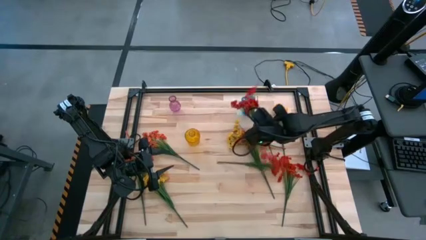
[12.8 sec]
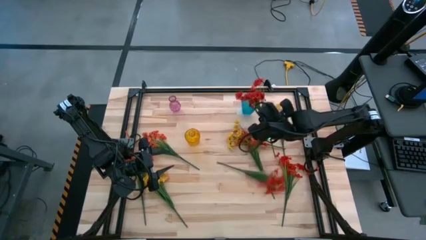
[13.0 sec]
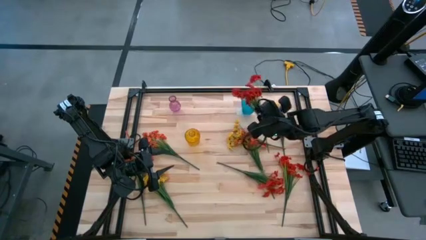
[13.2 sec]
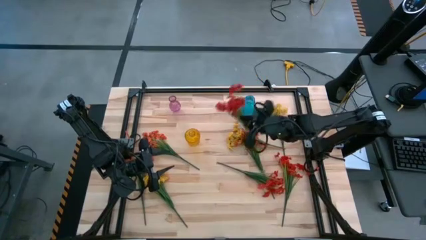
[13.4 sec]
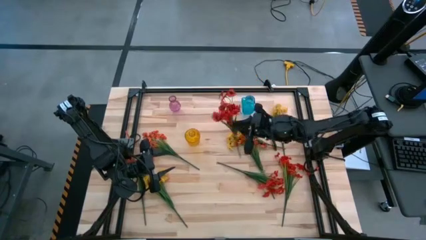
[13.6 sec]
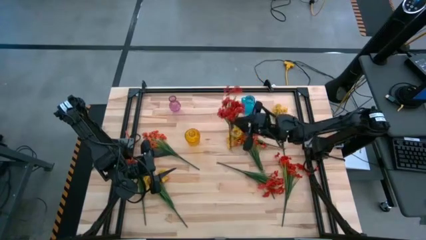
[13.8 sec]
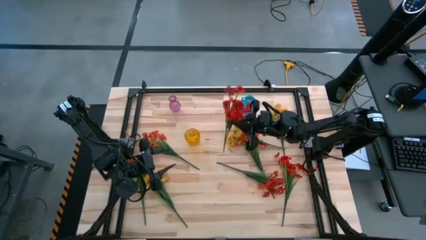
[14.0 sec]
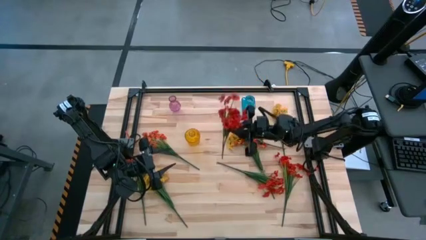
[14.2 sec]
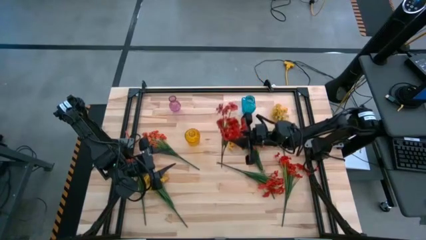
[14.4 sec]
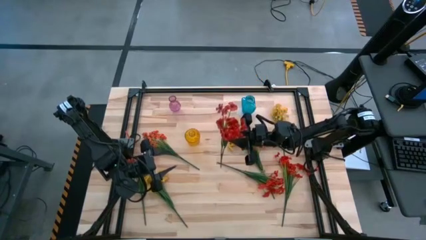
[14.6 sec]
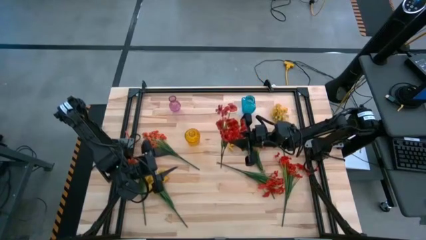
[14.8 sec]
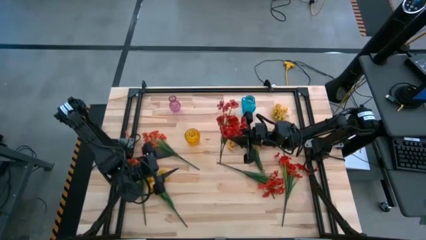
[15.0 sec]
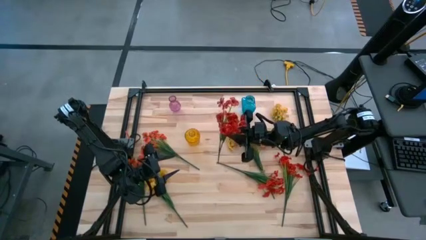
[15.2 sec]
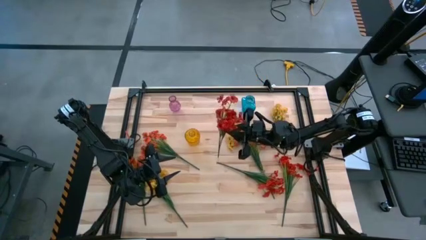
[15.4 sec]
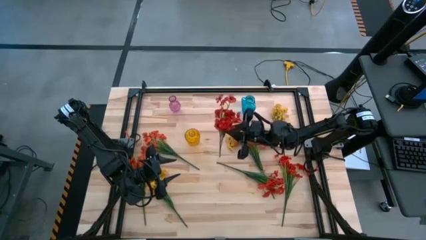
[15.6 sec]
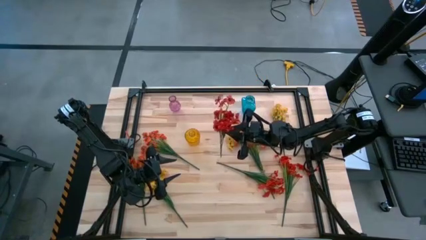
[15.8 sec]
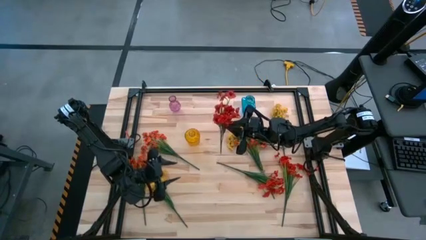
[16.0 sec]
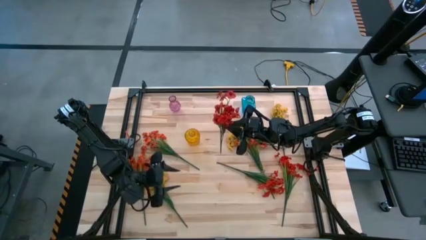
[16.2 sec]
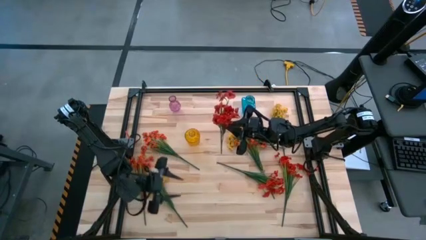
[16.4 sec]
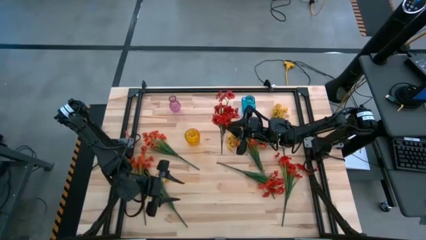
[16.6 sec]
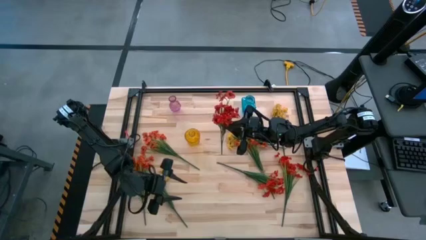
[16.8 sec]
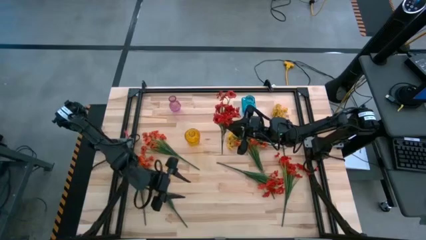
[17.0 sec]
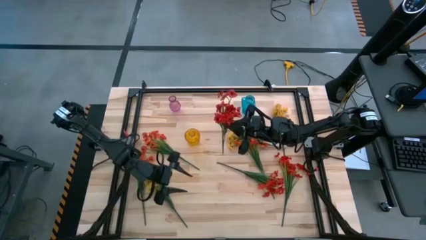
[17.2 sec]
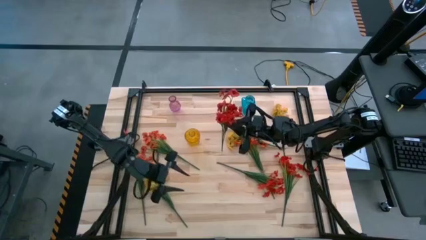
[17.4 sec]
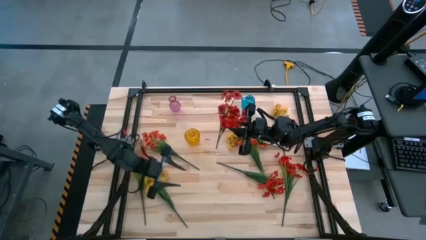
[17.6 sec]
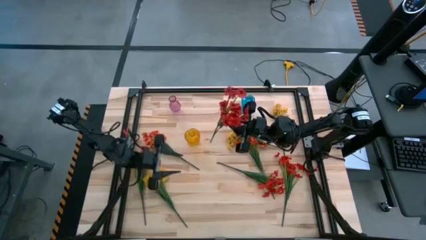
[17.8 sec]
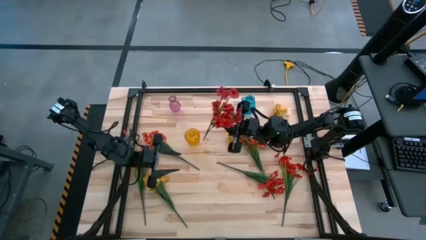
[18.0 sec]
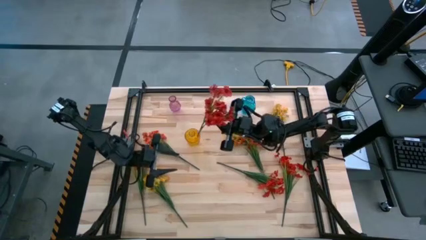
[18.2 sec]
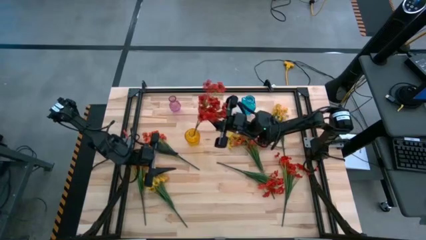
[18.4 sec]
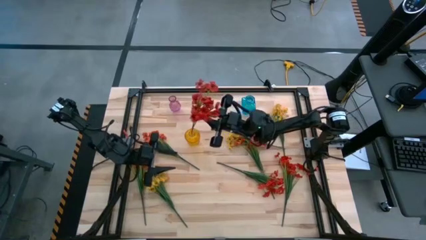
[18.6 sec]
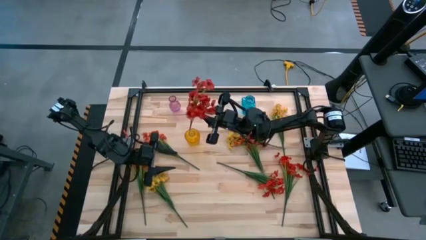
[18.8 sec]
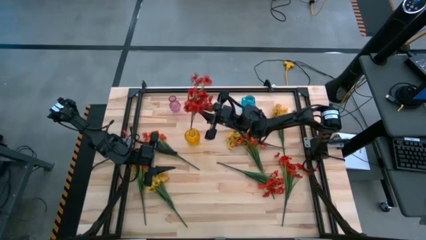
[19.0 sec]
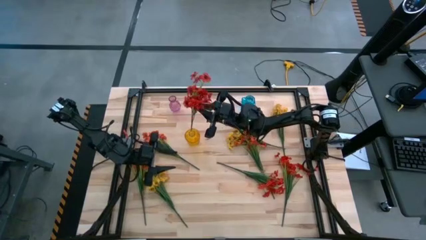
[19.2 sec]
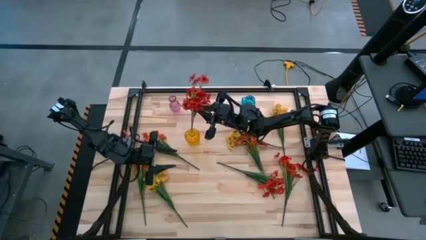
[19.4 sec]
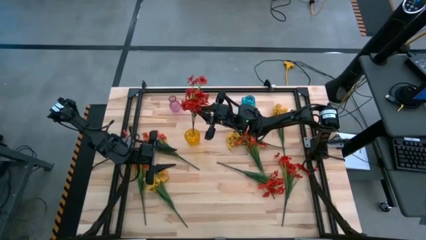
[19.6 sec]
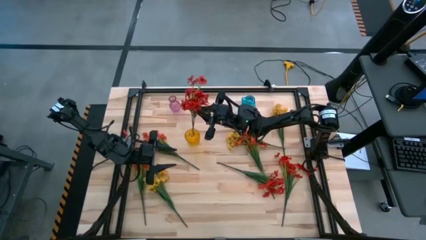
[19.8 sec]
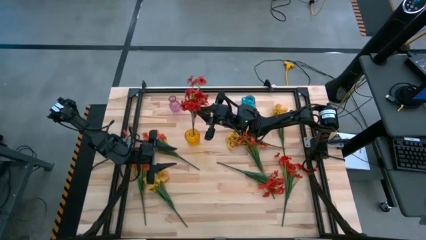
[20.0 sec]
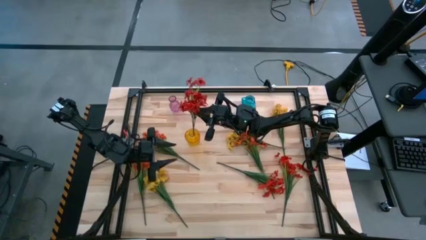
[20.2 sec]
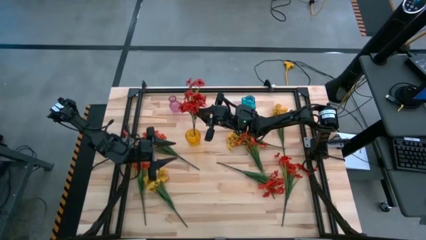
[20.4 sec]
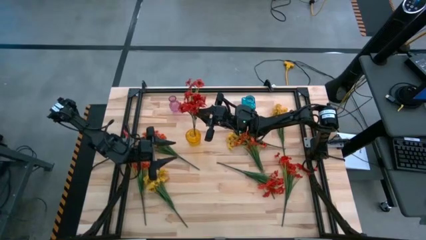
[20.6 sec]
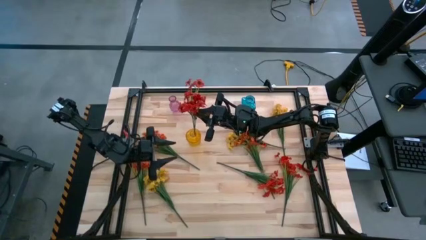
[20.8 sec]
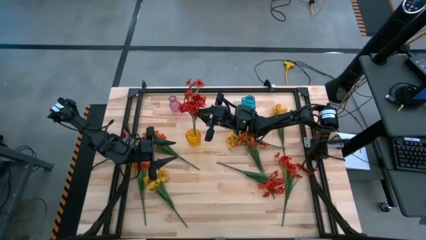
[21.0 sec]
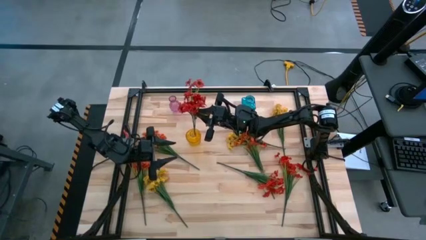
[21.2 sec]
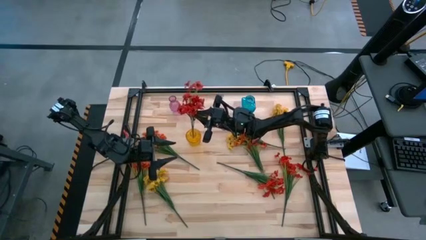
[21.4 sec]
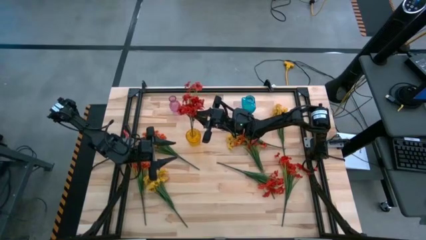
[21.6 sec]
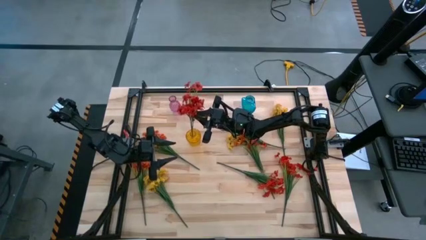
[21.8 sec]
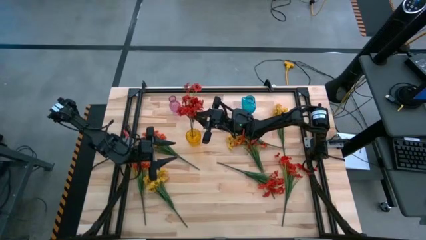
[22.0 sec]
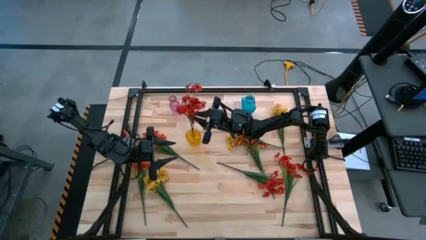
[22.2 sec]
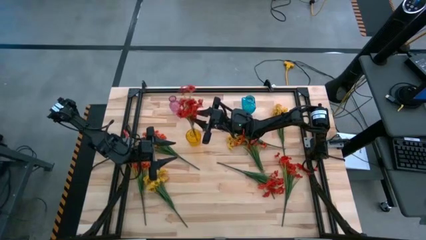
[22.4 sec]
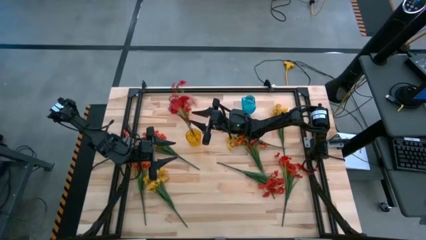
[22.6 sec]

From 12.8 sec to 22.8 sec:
Task: Sort flowers into vase by color
Put the left red flower into the yellow vase
